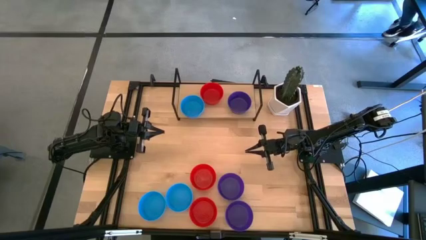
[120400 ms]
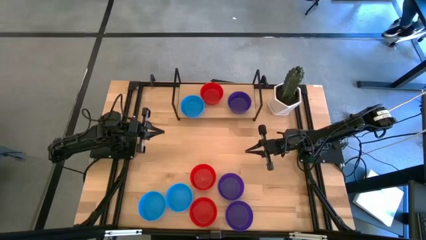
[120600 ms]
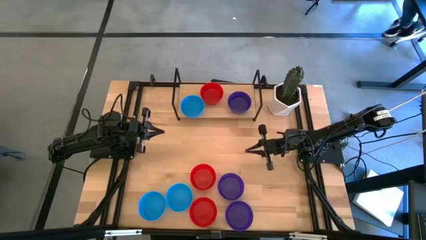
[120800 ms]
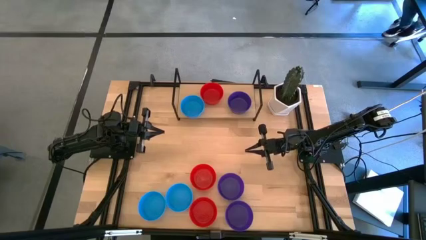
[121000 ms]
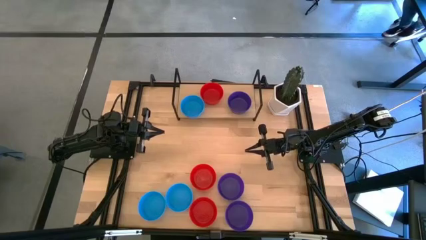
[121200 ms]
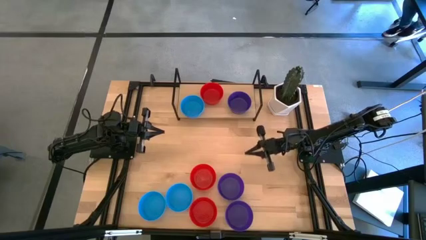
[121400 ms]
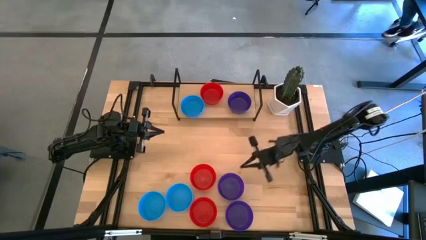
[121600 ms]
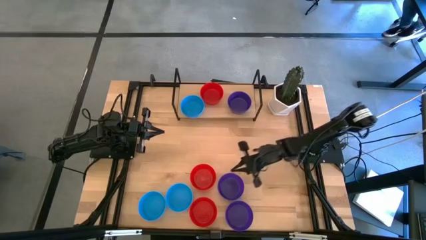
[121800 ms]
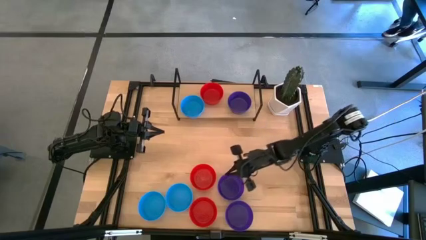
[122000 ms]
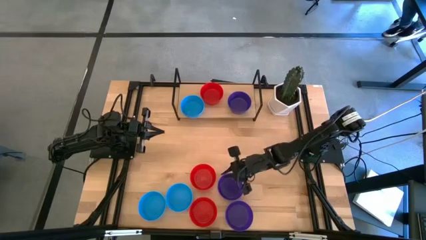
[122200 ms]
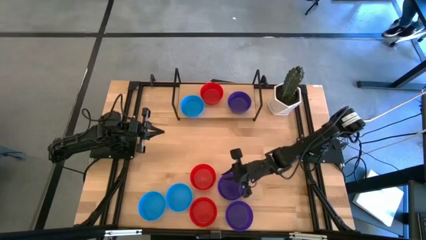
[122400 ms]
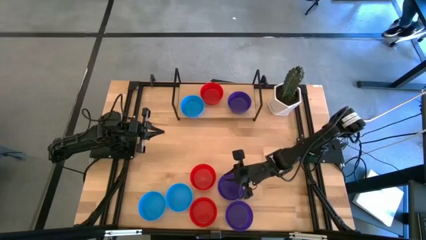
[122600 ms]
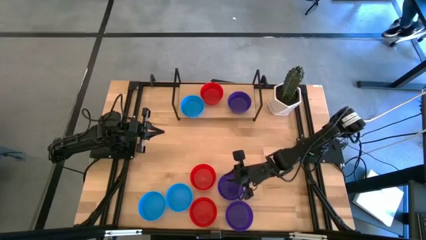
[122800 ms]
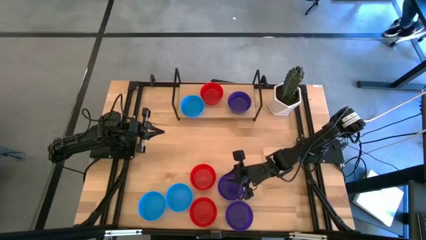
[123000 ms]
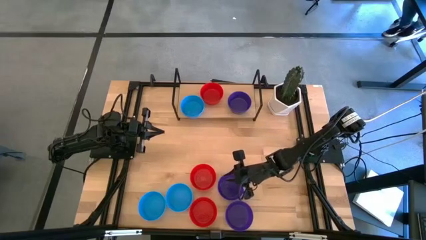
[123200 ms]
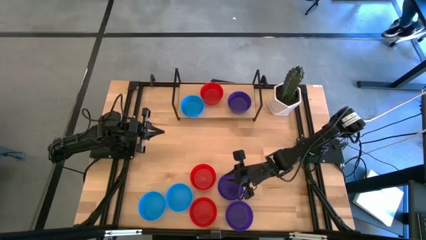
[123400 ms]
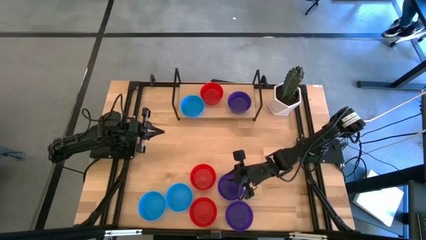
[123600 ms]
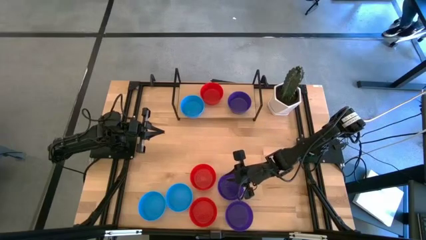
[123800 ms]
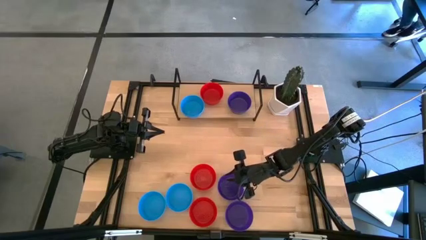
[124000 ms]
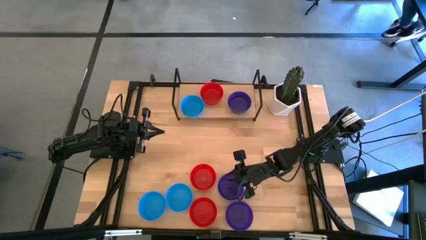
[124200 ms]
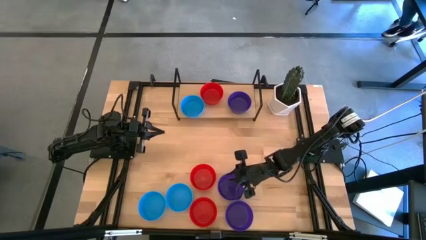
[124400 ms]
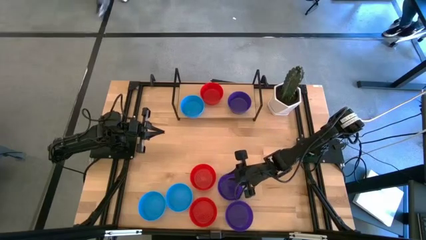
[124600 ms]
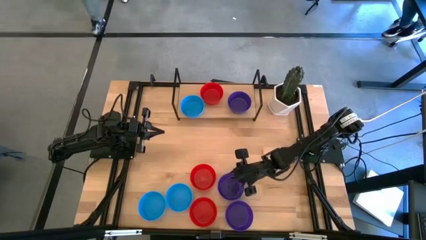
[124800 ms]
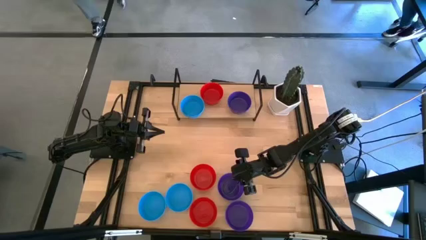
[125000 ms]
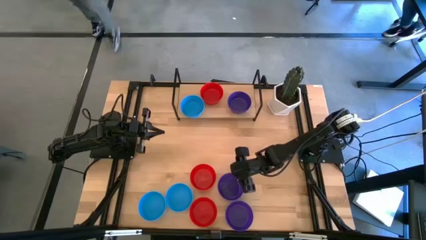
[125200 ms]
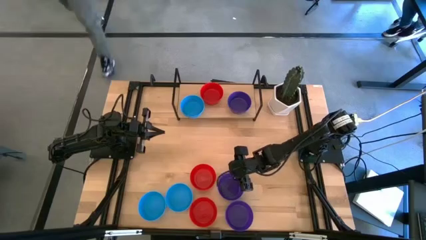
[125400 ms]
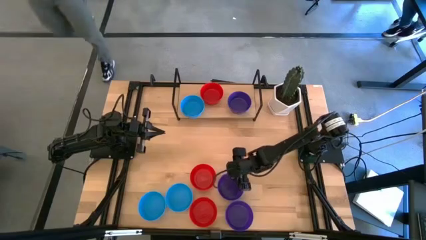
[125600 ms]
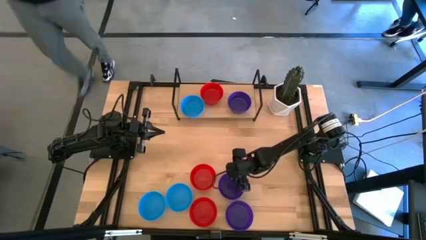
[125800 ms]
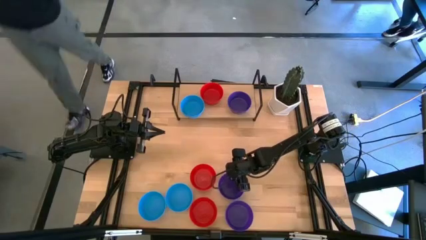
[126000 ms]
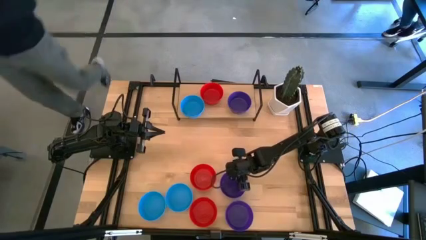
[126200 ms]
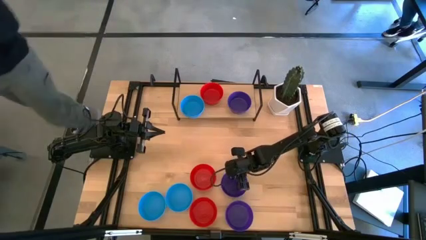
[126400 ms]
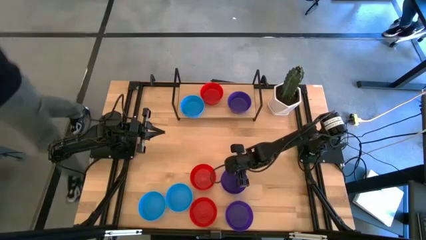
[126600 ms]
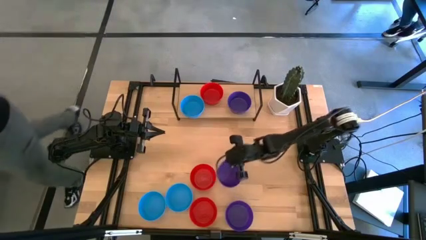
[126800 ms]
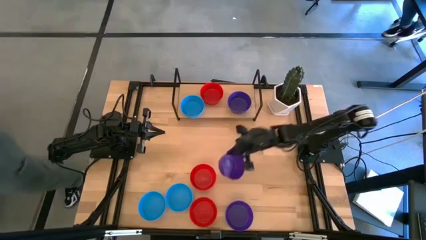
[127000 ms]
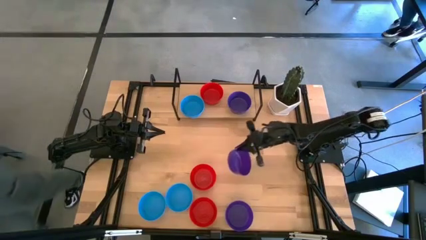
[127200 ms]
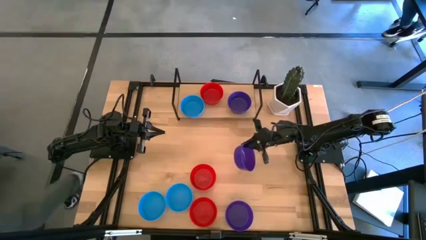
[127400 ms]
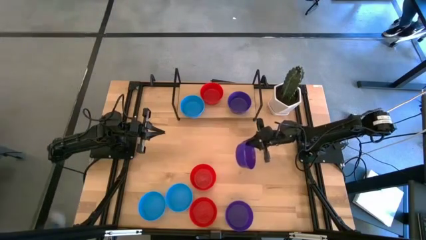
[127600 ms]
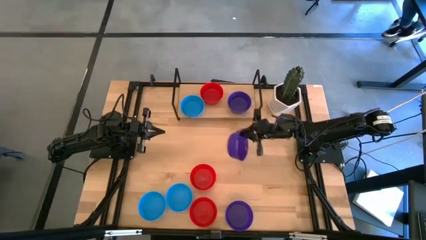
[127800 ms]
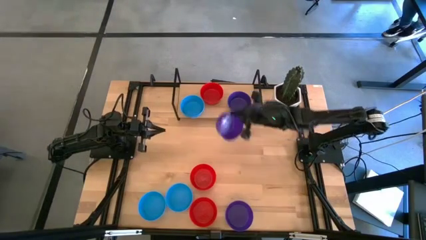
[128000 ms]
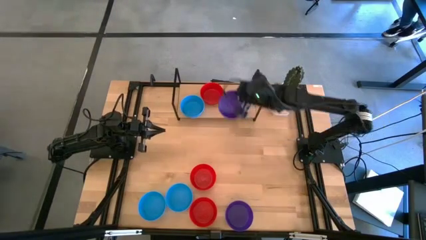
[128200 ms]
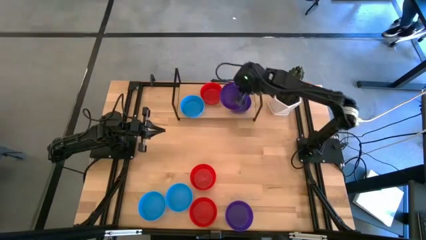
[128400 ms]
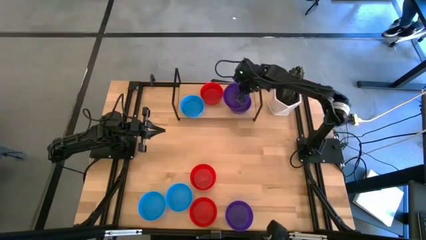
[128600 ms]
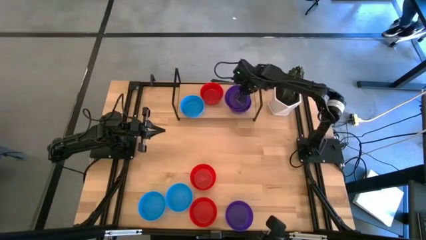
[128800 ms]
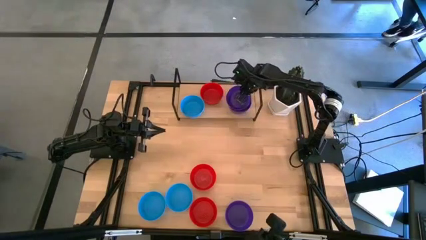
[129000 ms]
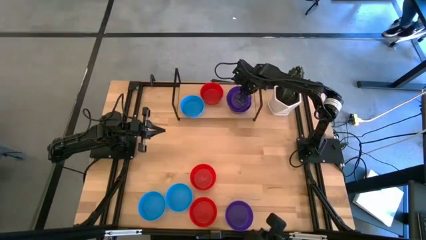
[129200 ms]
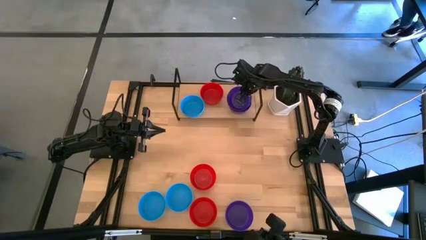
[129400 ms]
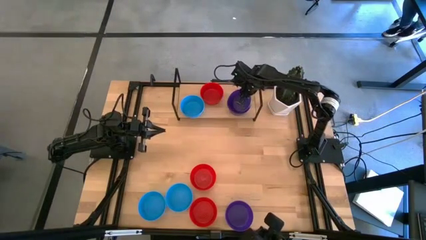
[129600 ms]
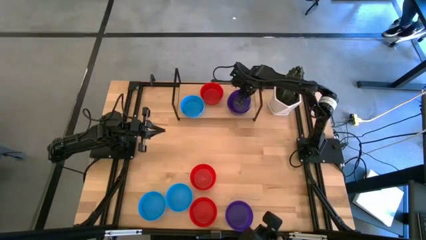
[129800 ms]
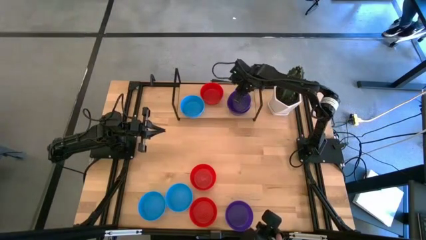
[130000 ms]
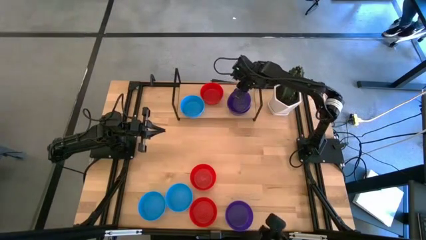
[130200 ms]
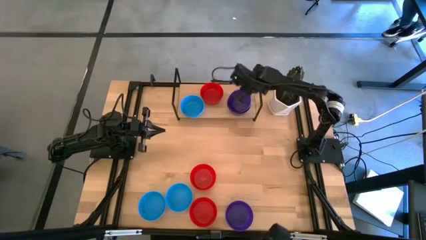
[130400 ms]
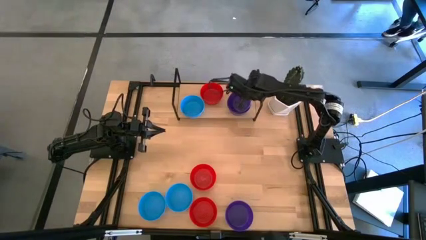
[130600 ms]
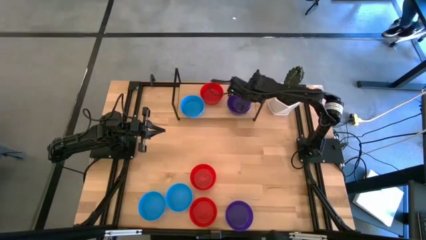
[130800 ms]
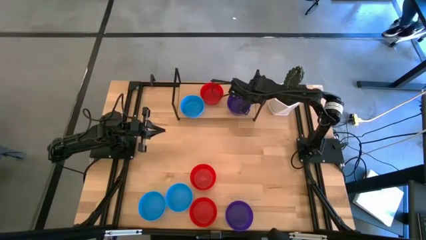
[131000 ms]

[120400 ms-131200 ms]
Task: Pick & Place Mini bowls
Stack the purple bowl on top of the purple bowl on the shelf

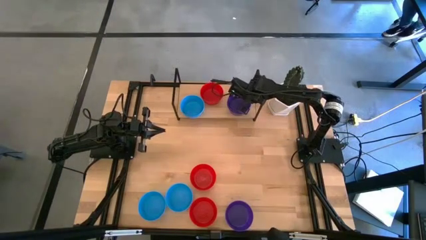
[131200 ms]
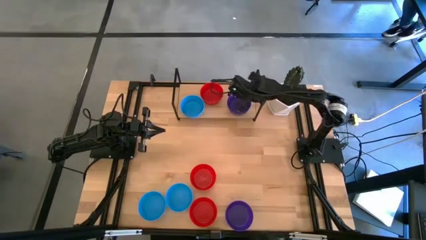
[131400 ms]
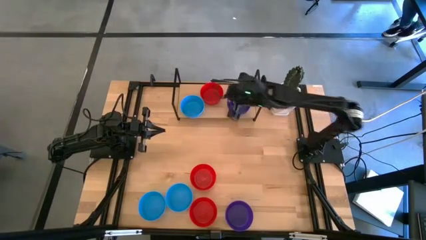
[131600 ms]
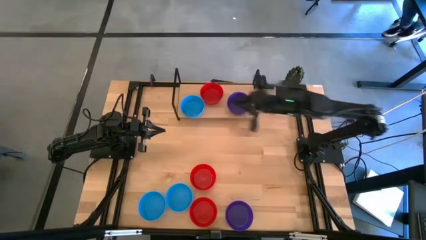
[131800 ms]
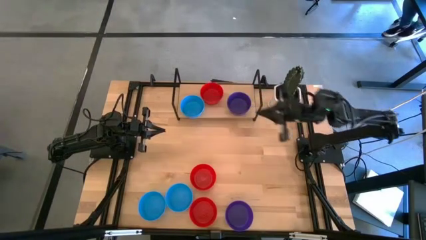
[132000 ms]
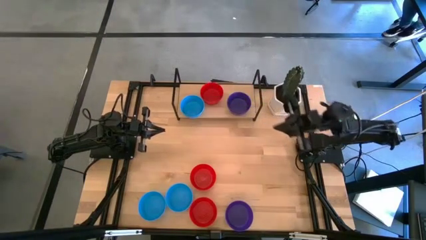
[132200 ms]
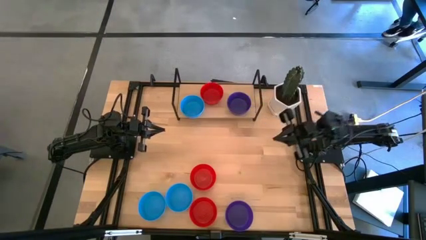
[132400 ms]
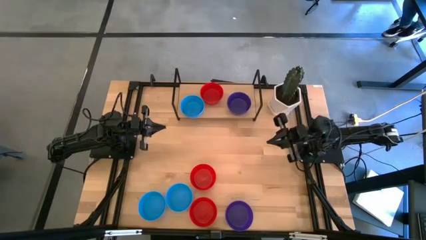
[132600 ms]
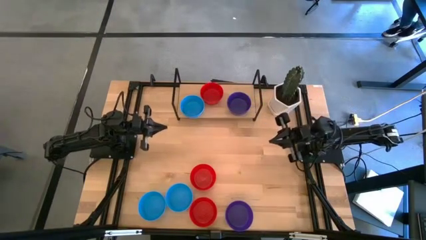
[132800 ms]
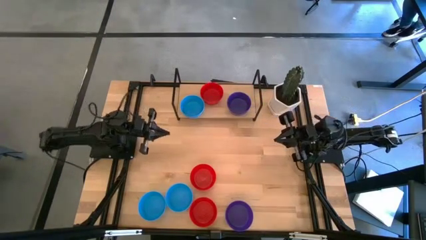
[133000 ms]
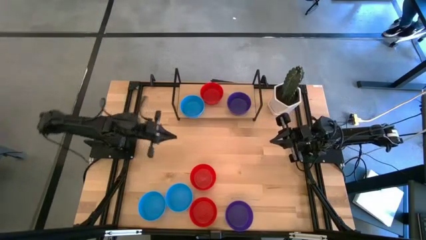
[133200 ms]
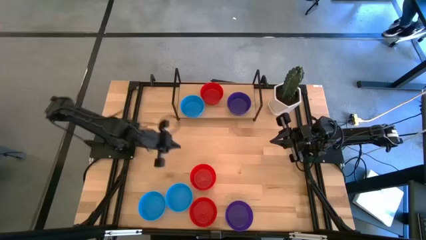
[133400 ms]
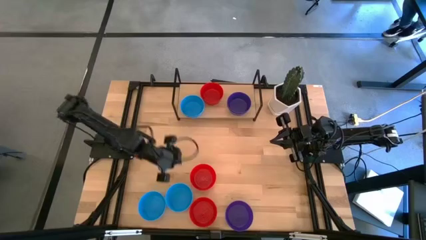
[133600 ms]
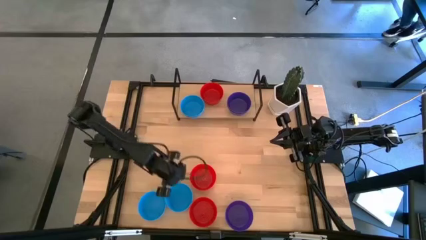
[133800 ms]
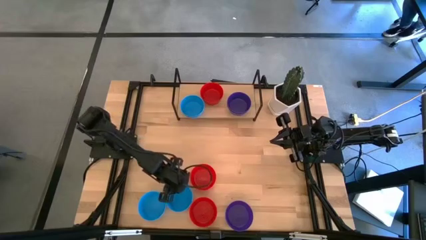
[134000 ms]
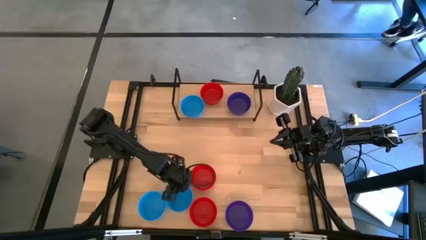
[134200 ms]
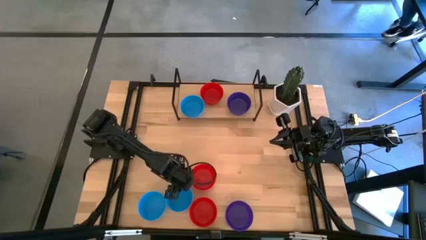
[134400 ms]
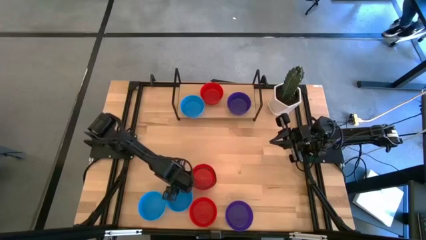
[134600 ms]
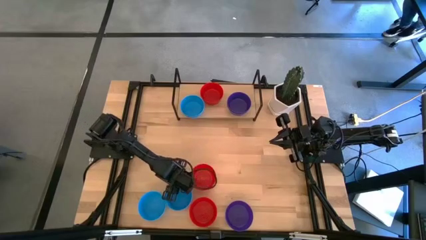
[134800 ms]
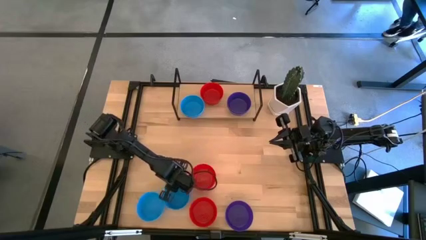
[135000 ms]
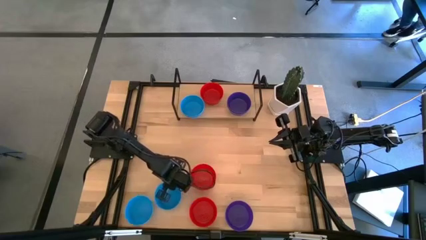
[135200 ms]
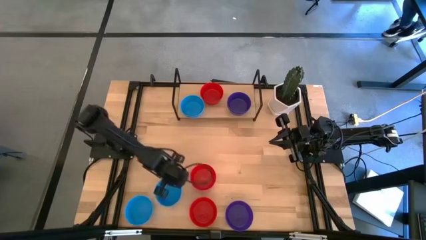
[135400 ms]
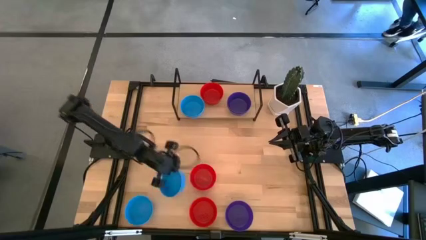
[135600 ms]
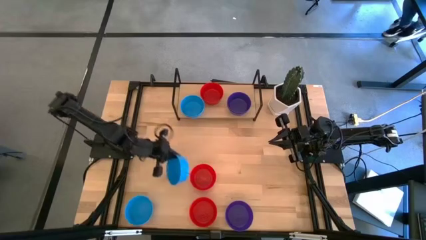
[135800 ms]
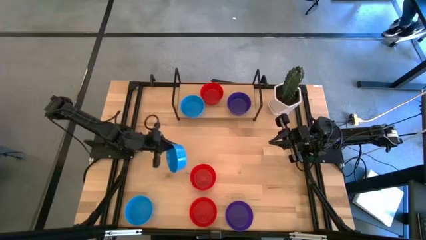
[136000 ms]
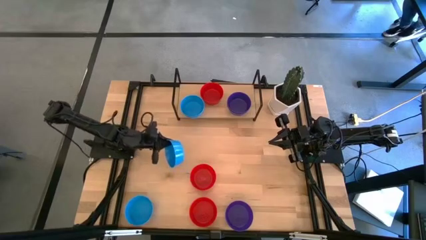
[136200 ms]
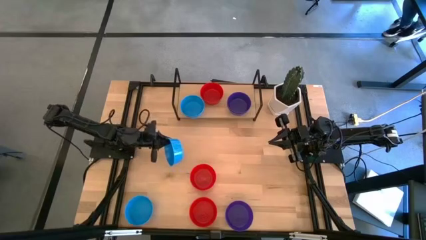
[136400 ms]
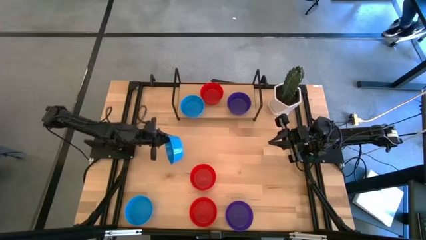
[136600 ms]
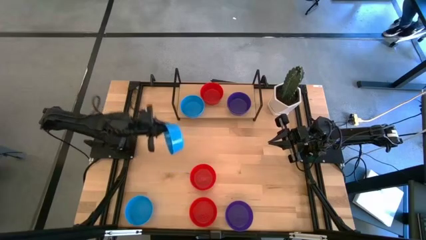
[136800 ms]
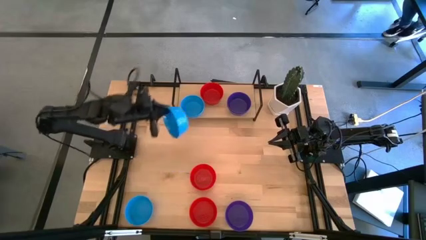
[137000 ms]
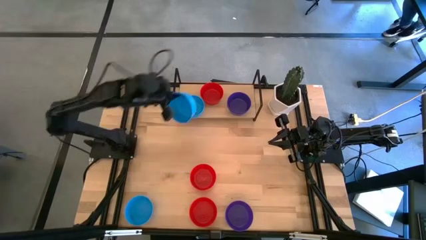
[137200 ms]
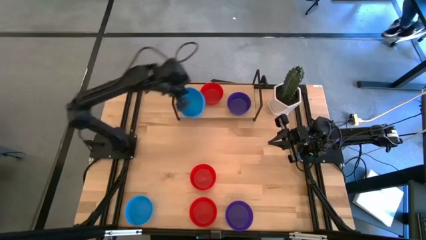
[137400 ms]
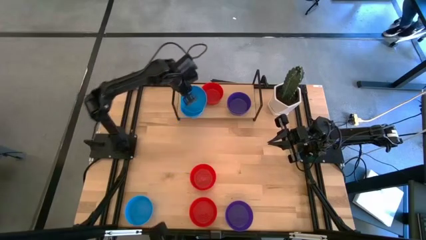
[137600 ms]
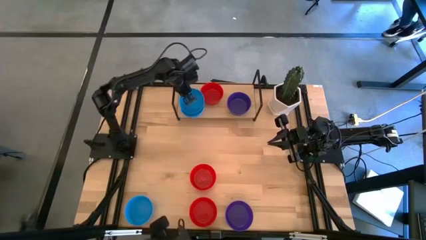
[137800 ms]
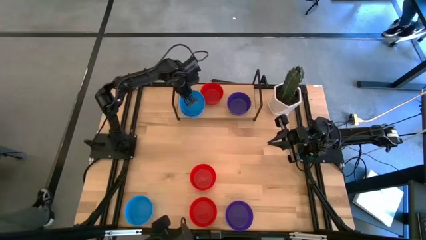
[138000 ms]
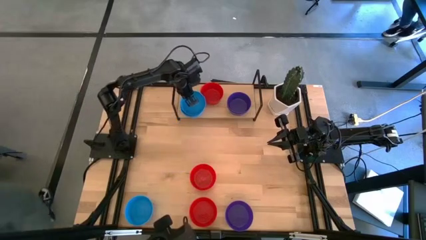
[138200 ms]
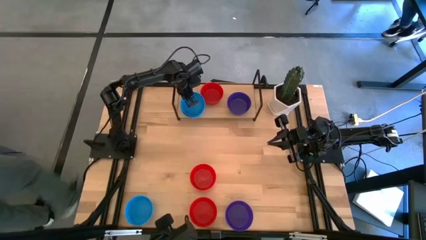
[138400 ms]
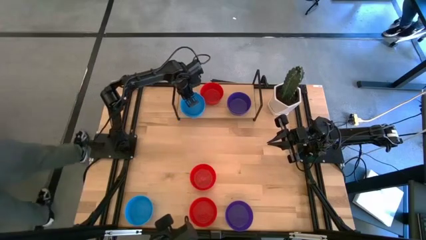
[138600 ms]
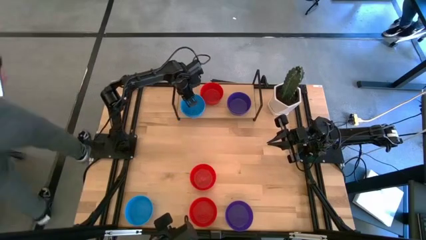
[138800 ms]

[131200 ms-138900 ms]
Stack the blue bowl on top of the blue bowl on the shelf
